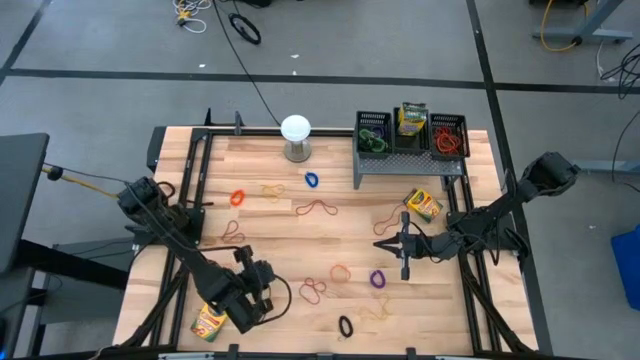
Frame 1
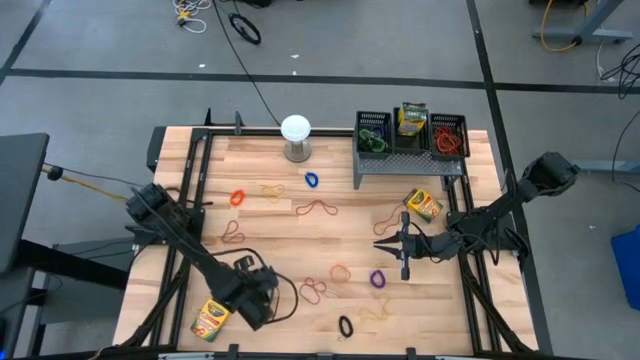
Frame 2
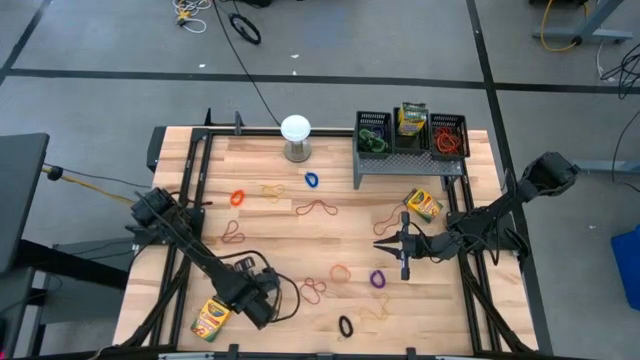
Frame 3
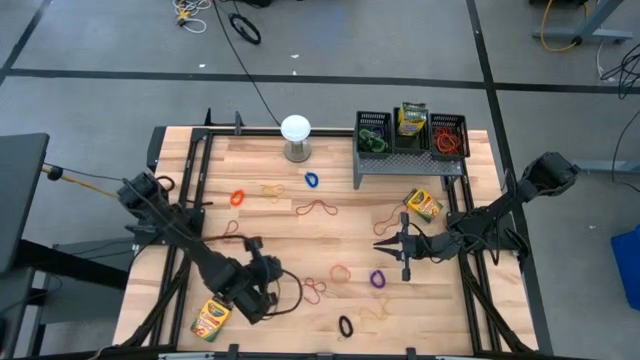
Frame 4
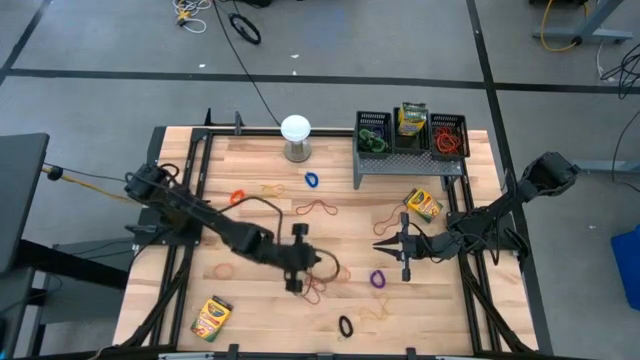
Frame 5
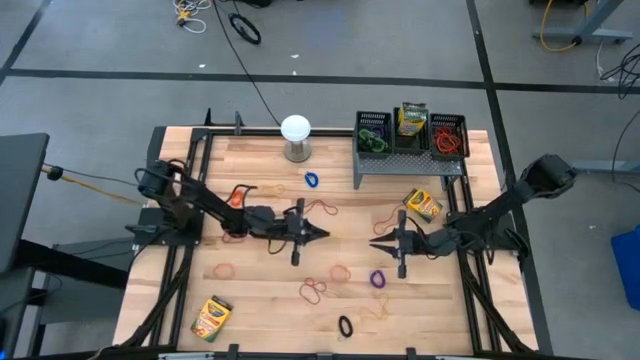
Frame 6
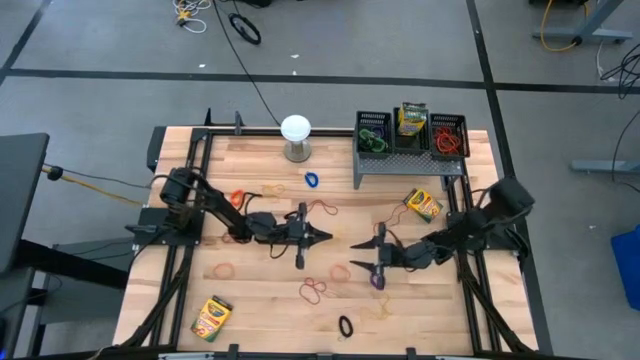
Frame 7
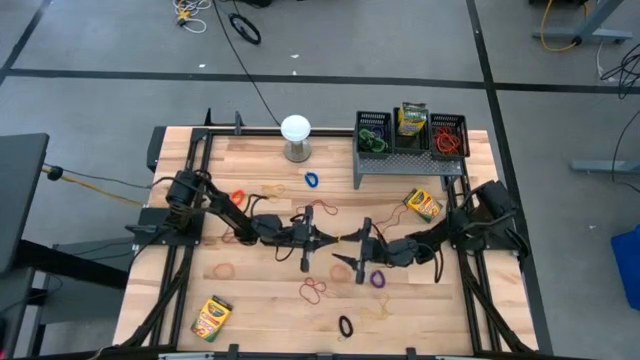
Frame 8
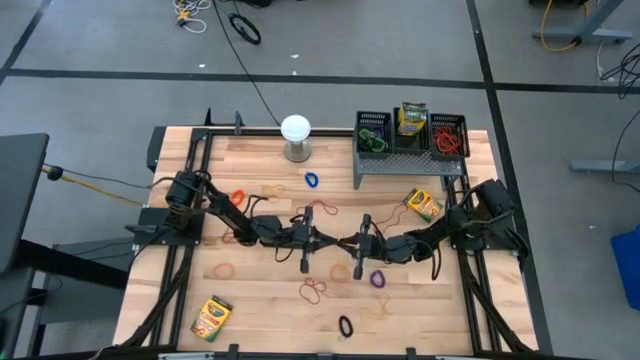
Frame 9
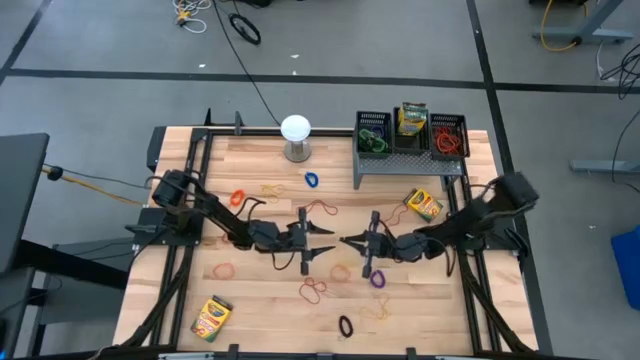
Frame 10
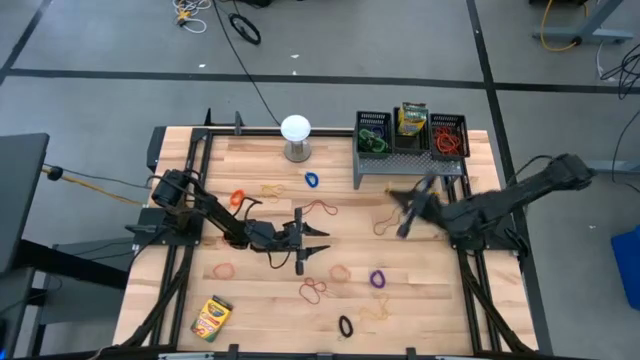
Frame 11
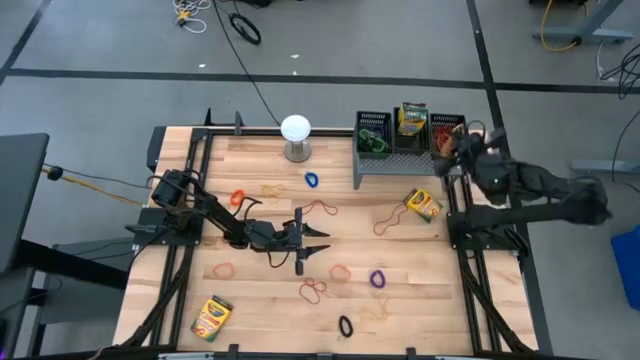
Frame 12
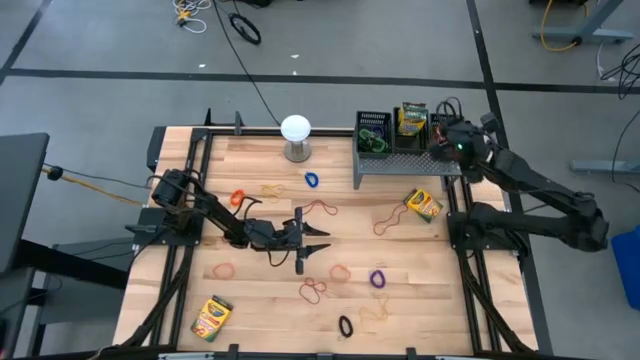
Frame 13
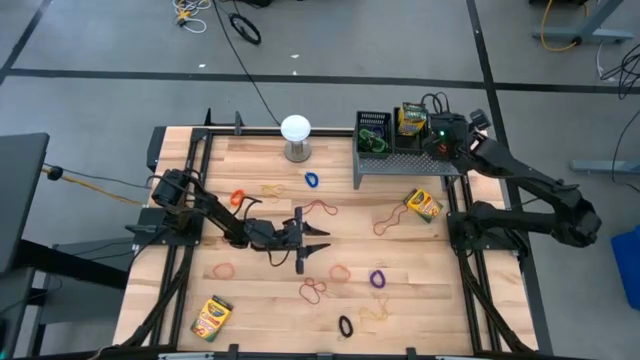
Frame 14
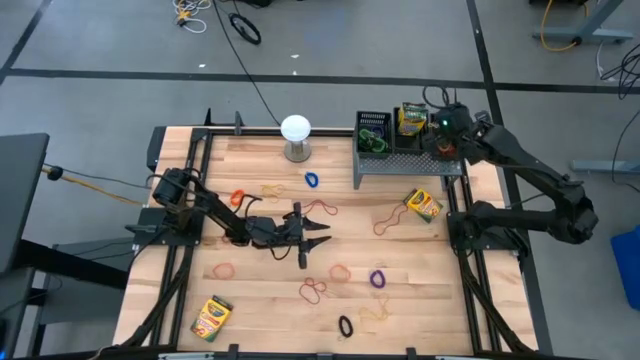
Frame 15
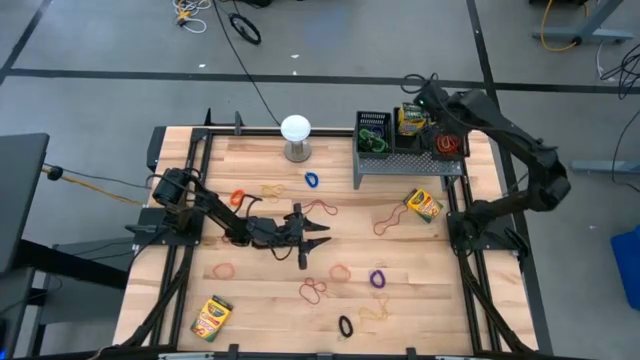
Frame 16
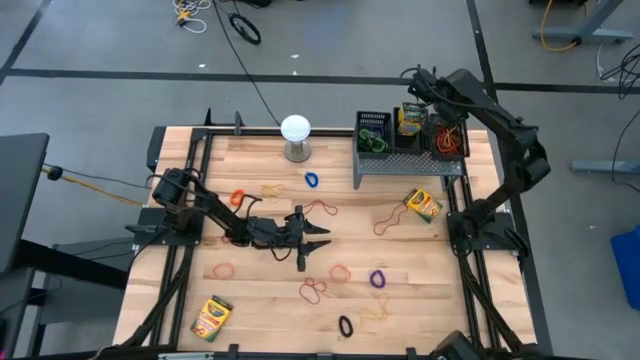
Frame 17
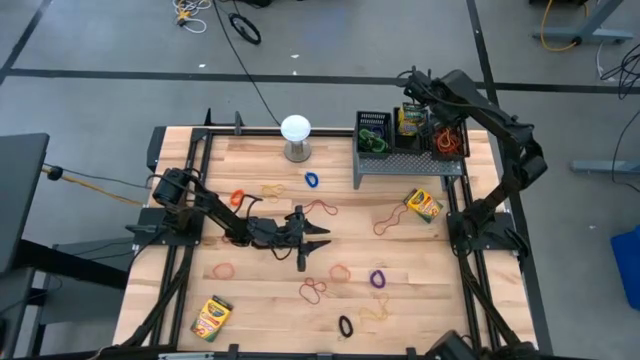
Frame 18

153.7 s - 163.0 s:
Task: Pick & Place Office Desk Supplies
Put the yellow rubberband into the right black basket on the shelf

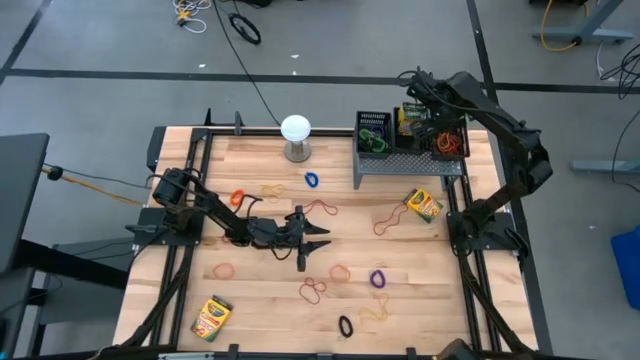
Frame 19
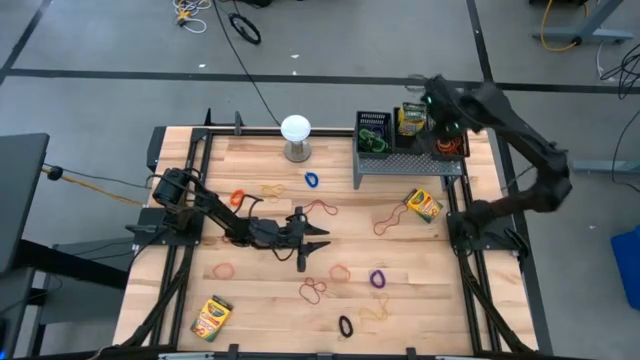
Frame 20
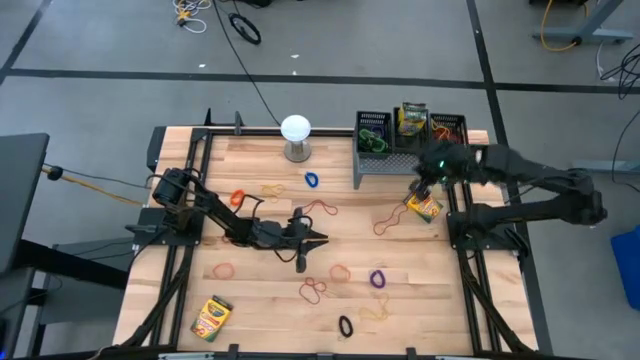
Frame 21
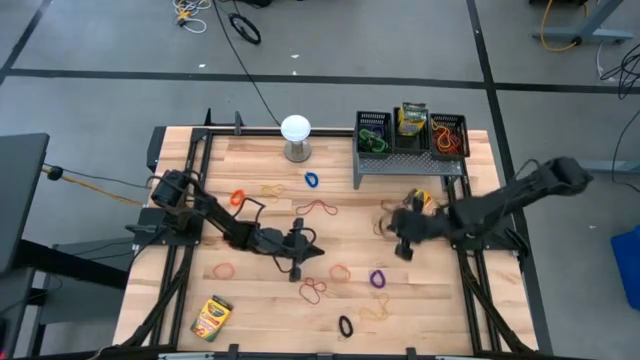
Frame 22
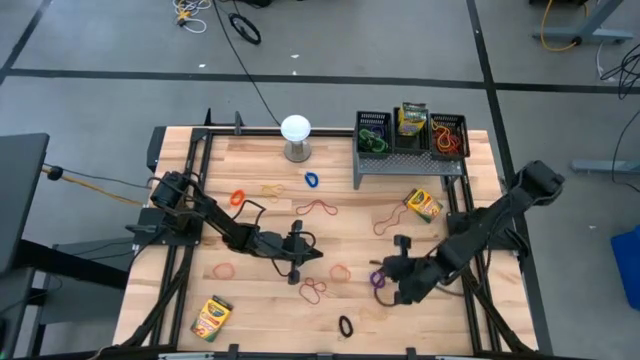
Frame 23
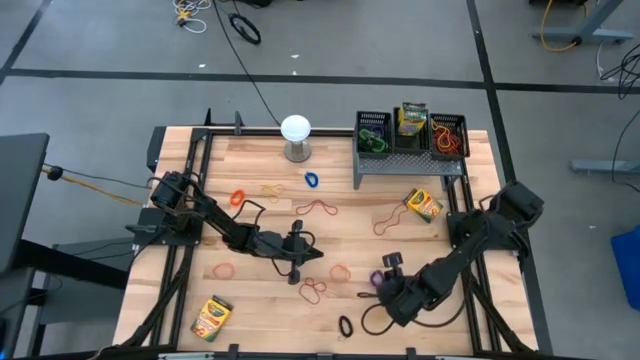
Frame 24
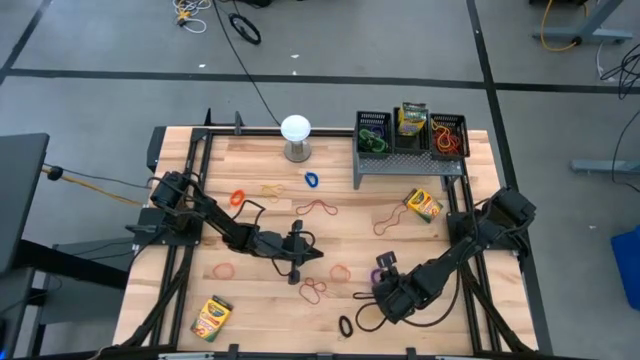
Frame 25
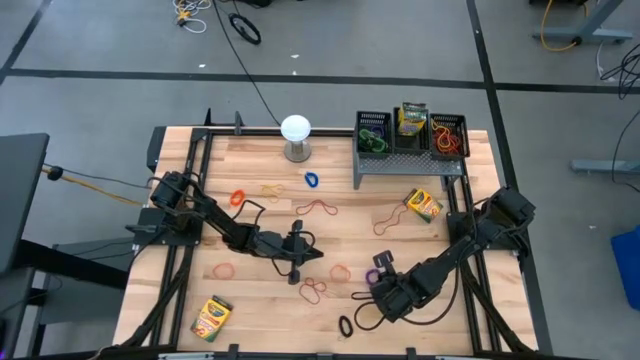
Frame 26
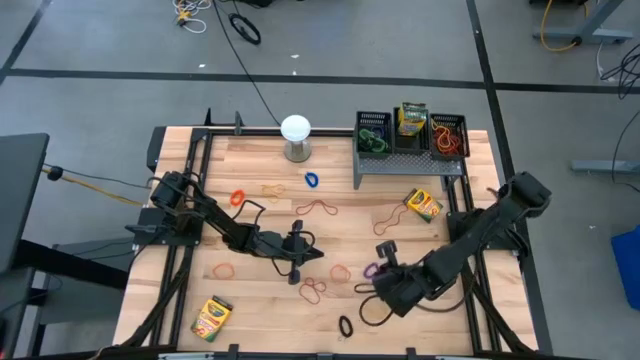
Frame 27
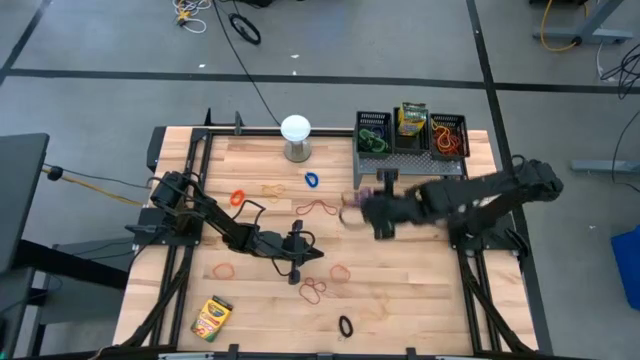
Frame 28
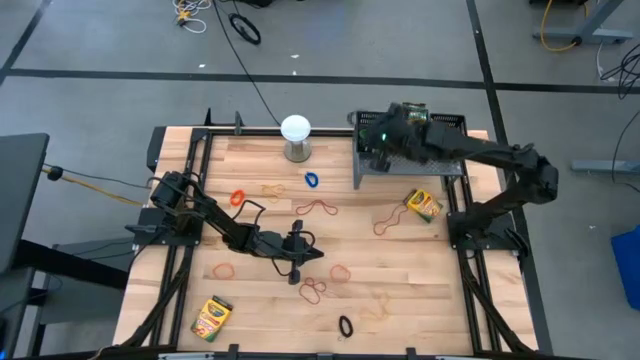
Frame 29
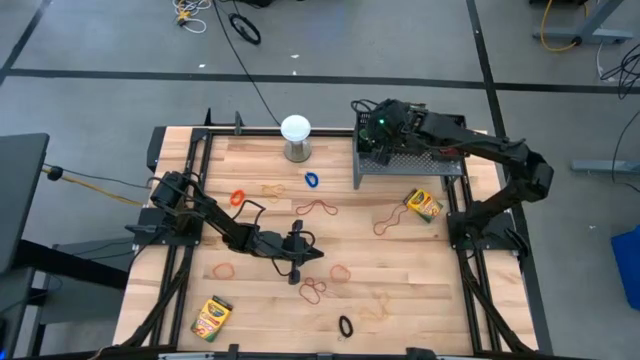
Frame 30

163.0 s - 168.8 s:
Put the violet spring keychain into the left black basket on the shelf

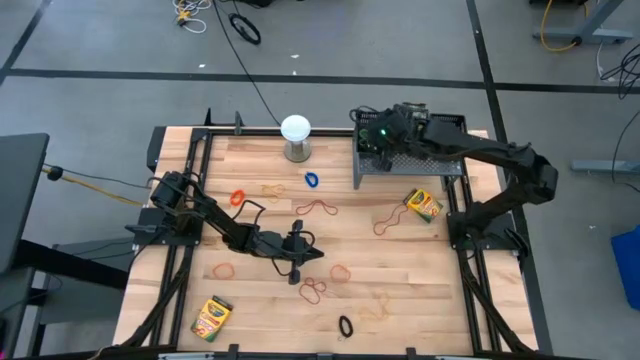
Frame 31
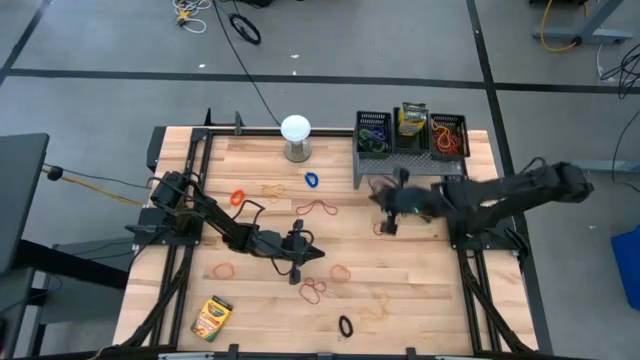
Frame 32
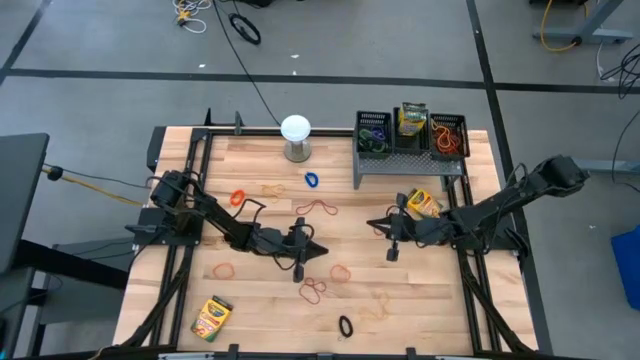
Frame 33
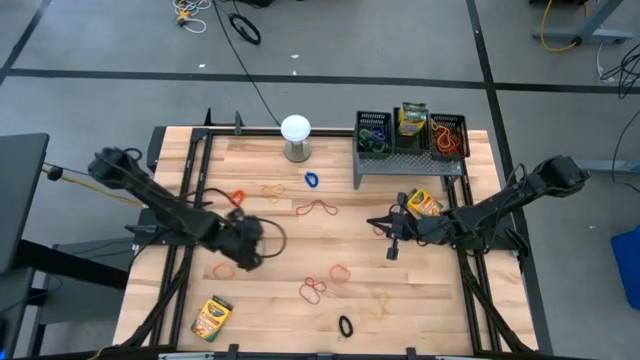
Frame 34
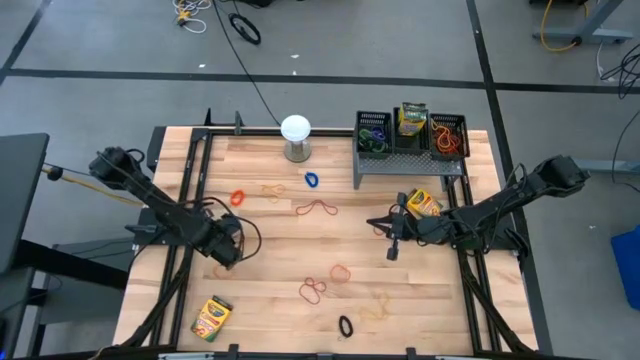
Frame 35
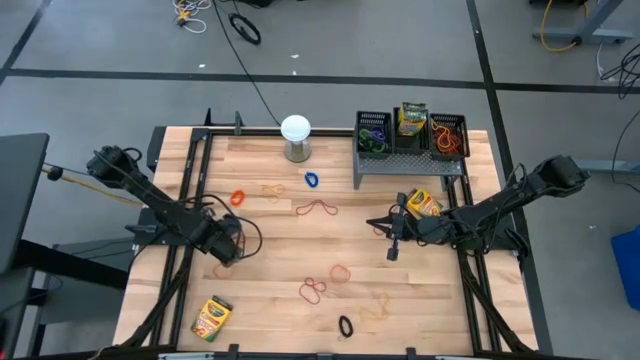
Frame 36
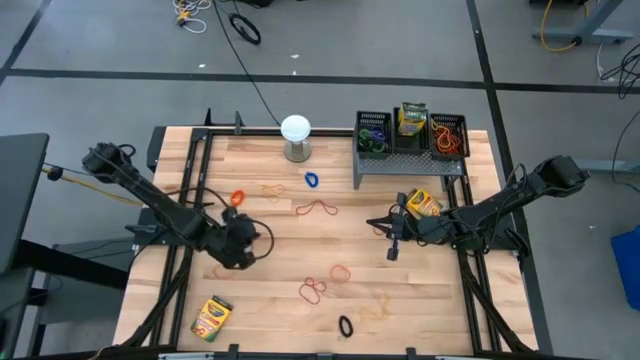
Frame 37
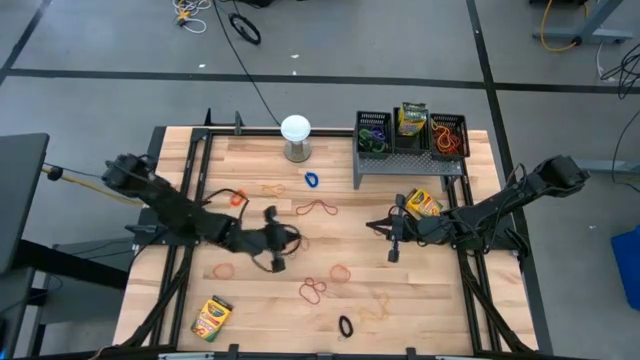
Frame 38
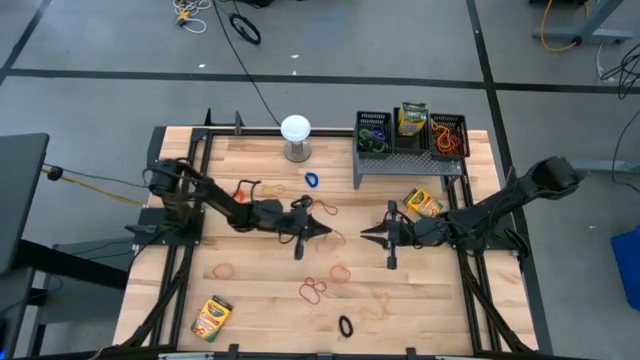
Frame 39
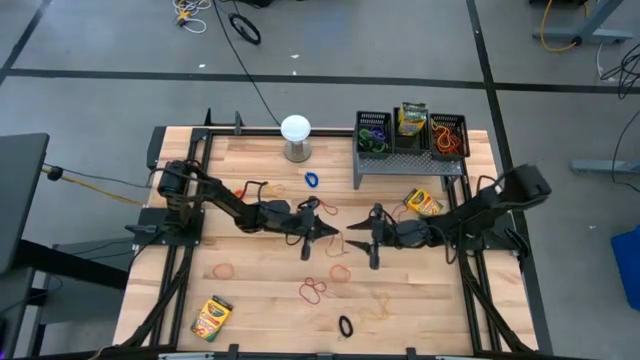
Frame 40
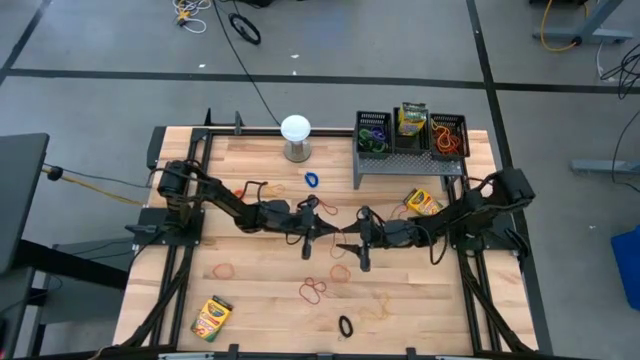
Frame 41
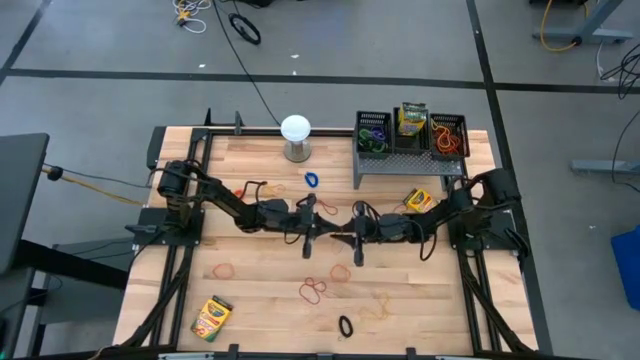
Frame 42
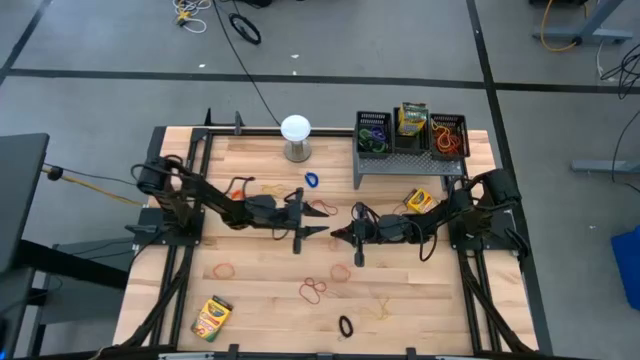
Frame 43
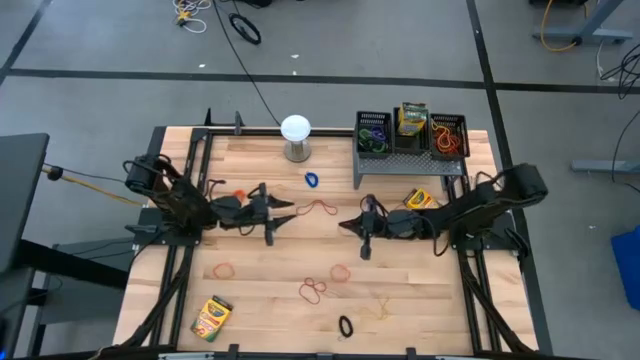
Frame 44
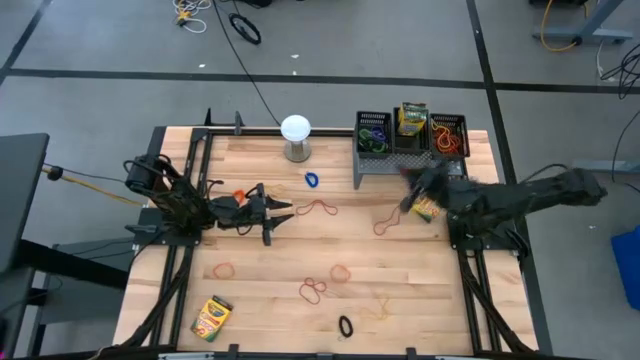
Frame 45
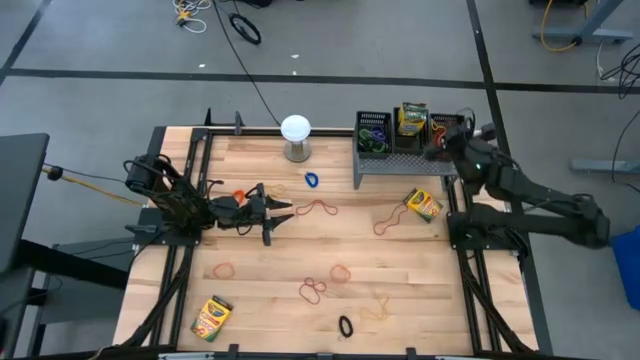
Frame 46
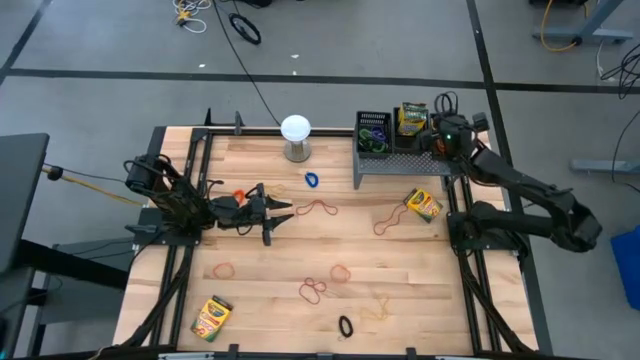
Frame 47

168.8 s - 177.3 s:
Put the red rubberband into the right black basket on the shelf
